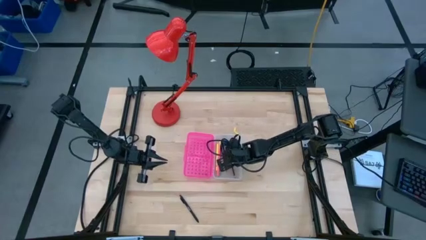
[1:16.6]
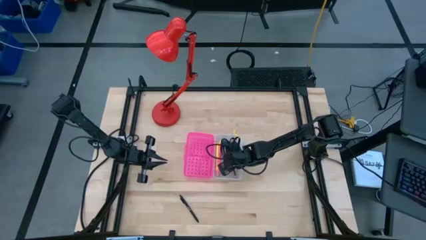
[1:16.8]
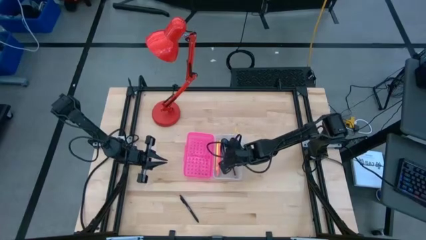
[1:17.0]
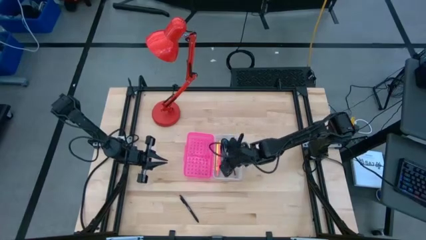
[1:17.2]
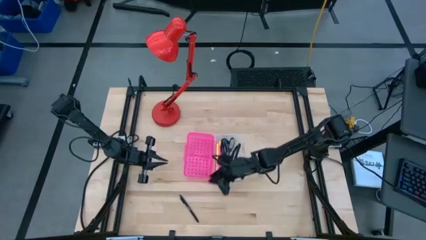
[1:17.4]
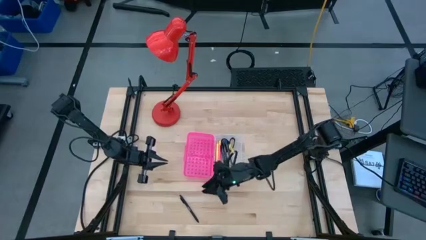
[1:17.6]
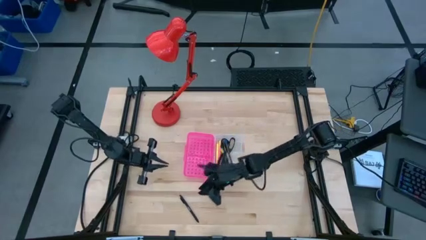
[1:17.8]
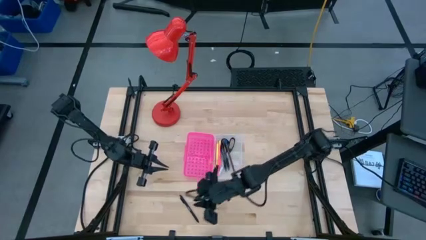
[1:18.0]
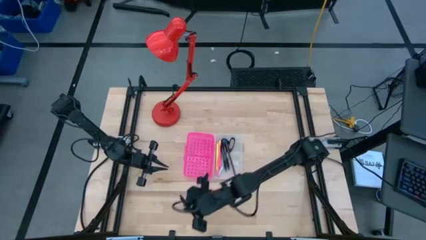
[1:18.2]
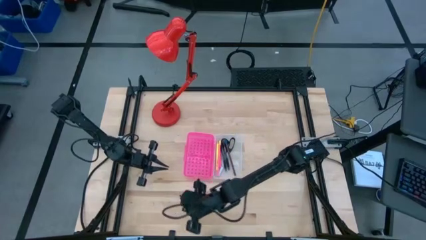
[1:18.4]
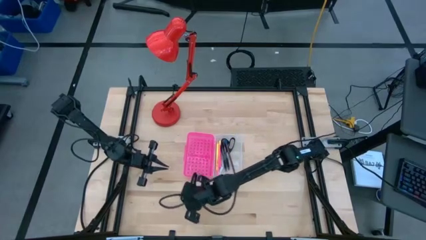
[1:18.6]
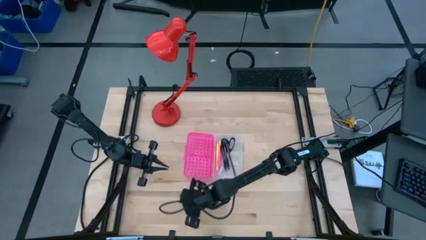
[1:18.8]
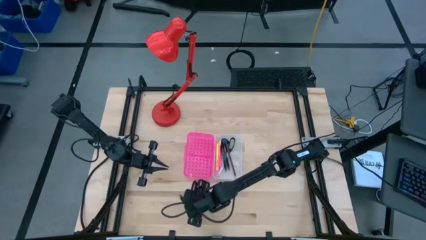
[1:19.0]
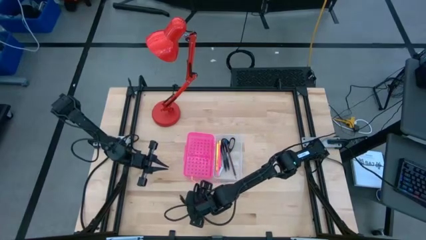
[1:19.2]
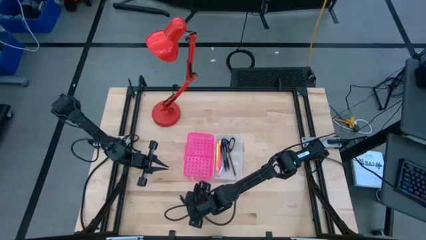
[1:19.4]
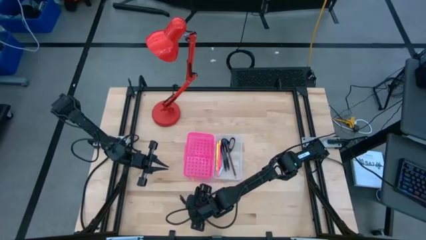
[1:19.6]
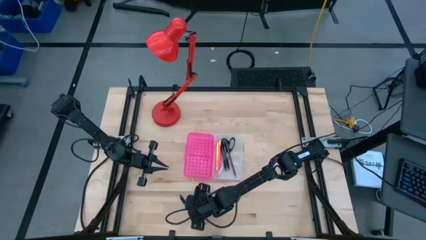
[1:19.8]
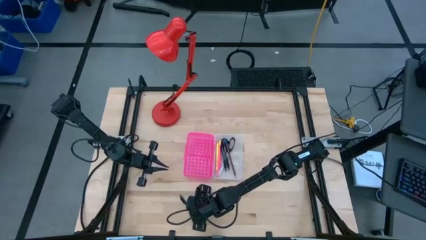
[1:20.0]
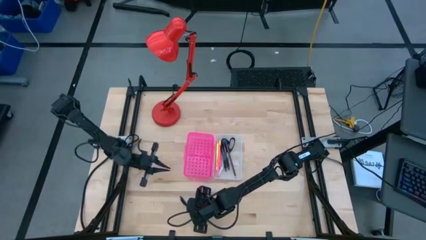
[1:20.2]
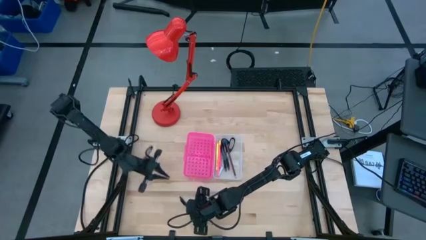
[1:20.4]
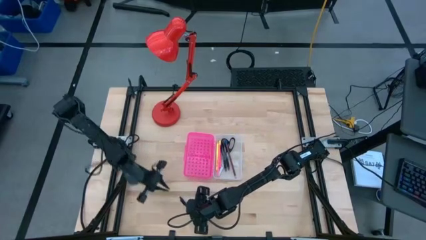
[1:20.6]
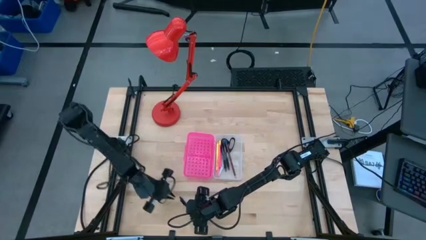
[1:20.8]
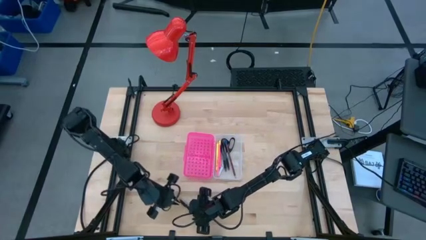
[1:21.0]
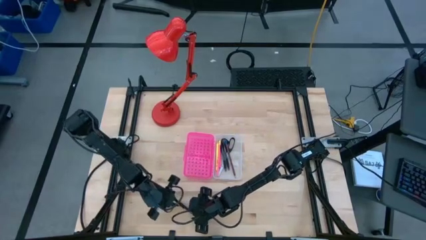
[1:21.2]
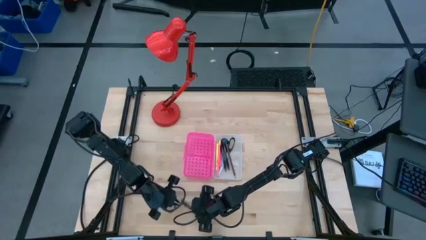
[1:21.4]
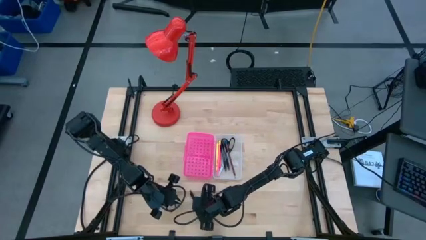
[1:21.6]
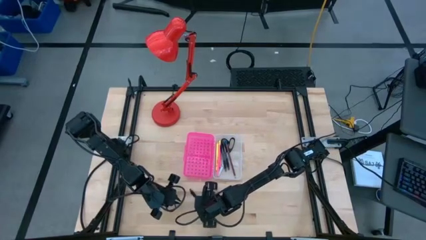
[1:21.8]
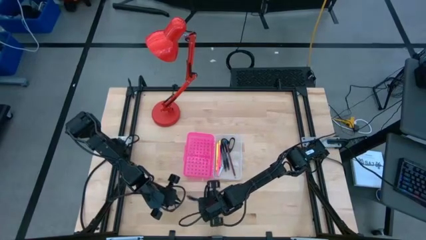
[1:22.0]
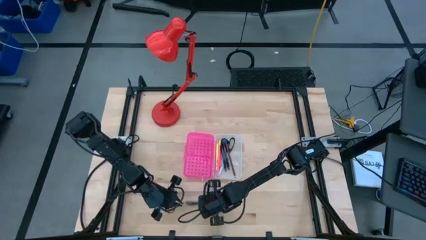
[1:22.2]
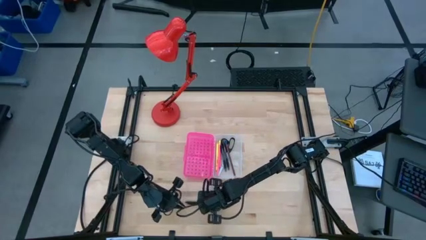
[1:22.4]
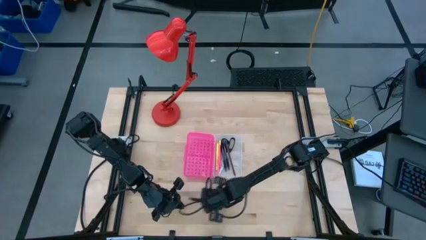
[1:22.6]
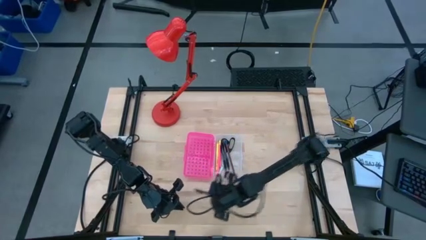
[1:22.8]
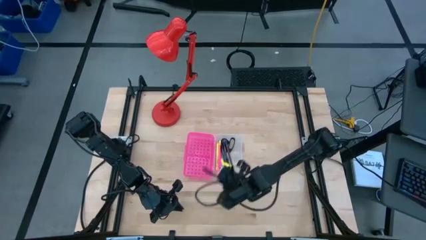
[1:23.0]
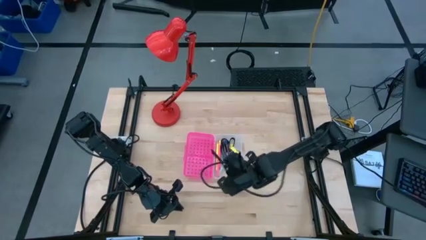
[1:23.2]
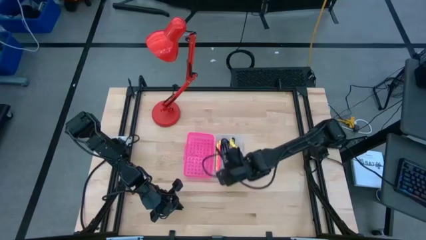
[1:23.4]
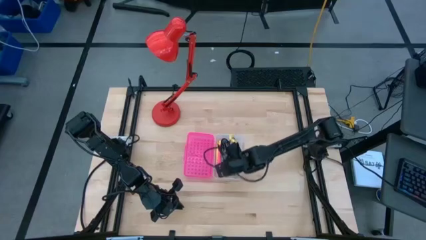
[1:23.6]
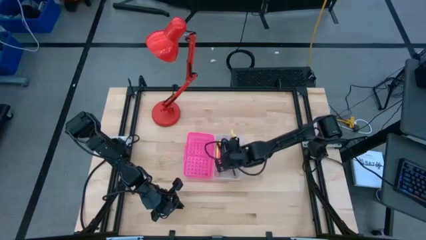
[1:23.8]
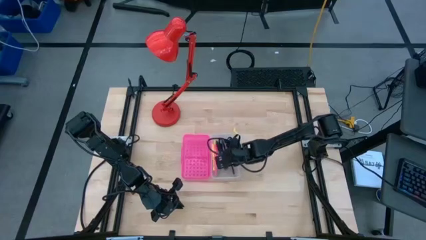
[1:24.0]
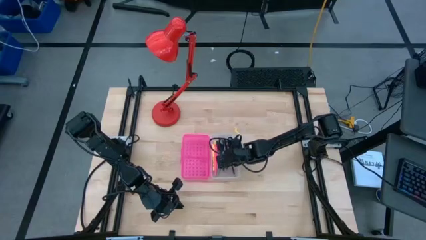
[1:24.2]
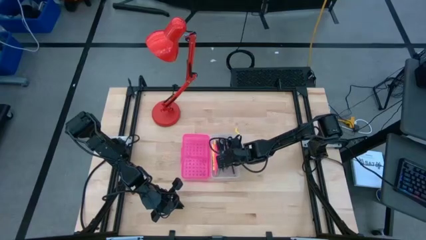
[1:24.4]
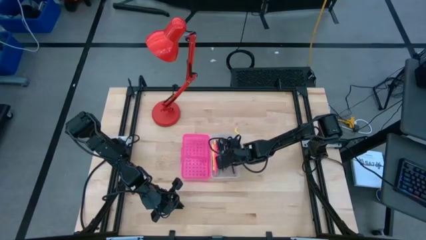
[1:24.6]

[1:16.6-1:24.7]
Task: Pick & place school supplies into a supply box
Put the black pen into the pink supply box

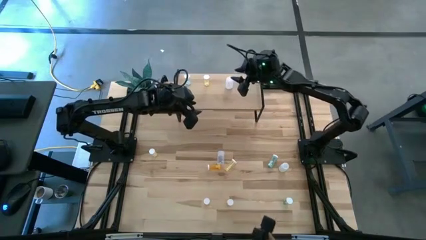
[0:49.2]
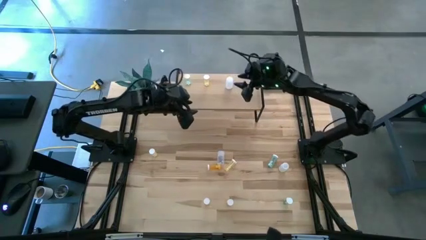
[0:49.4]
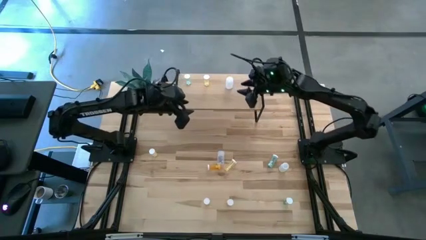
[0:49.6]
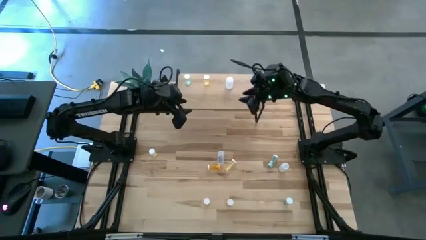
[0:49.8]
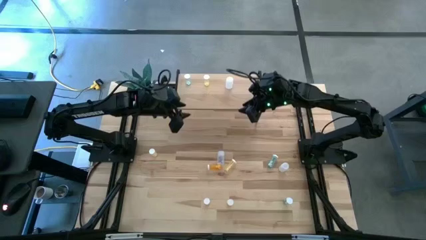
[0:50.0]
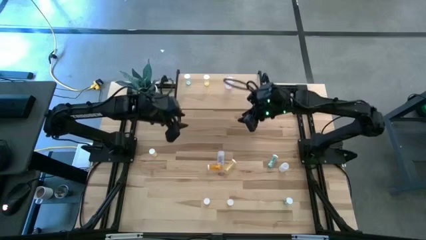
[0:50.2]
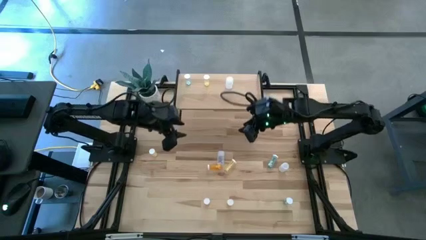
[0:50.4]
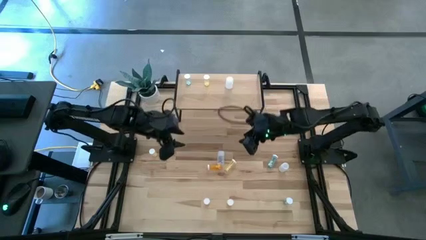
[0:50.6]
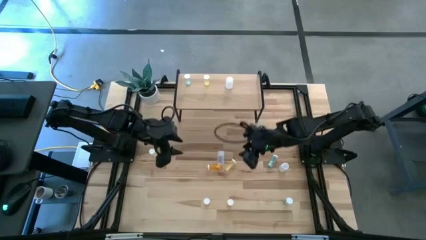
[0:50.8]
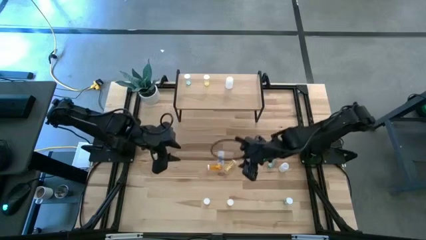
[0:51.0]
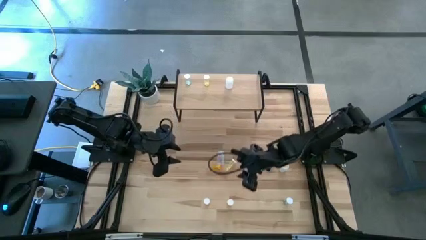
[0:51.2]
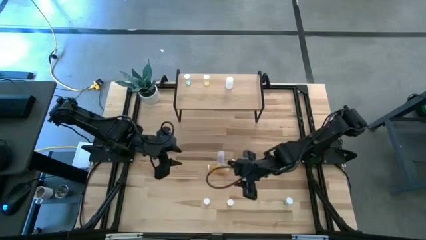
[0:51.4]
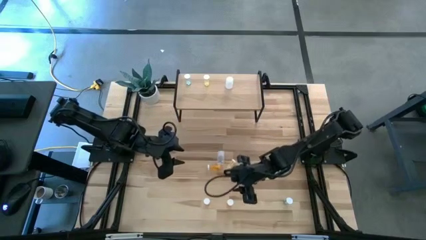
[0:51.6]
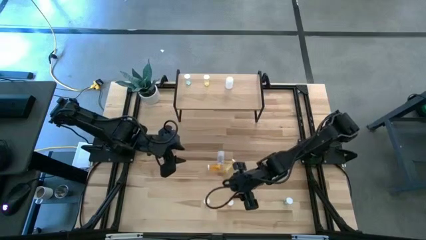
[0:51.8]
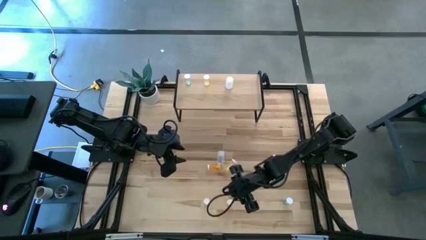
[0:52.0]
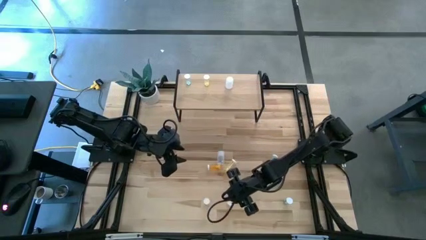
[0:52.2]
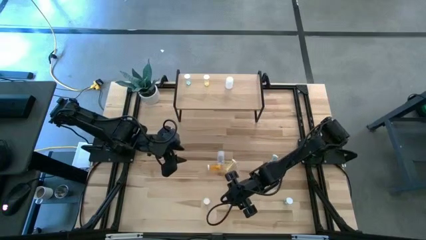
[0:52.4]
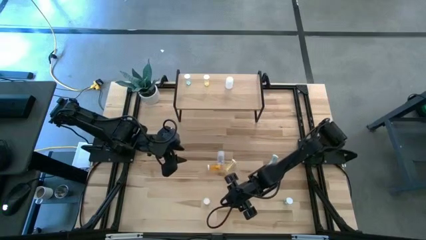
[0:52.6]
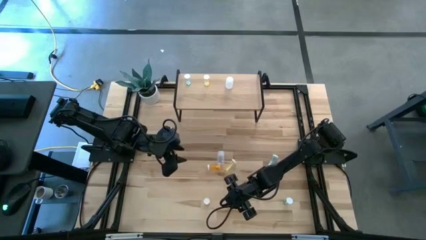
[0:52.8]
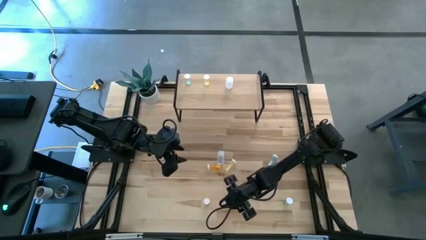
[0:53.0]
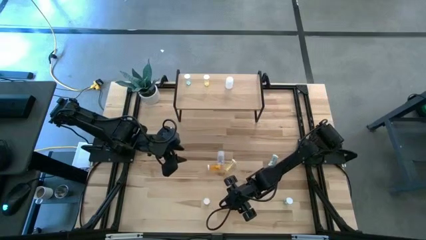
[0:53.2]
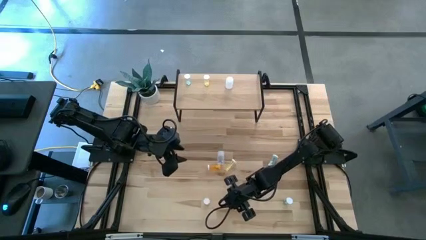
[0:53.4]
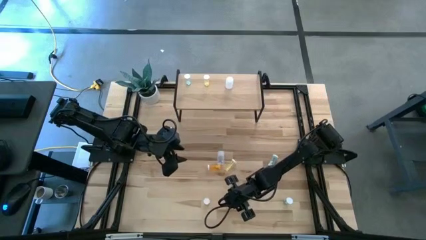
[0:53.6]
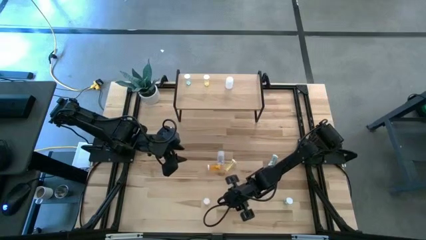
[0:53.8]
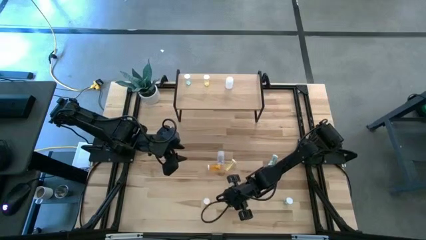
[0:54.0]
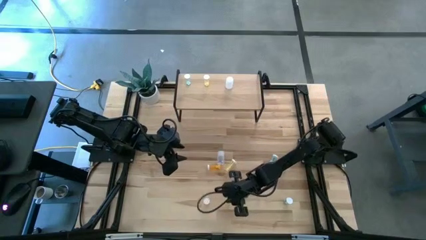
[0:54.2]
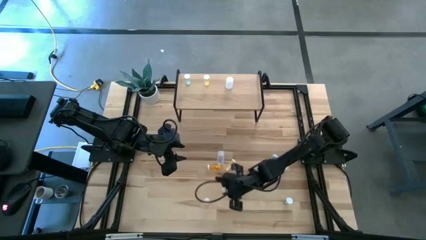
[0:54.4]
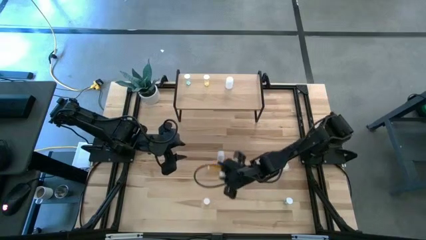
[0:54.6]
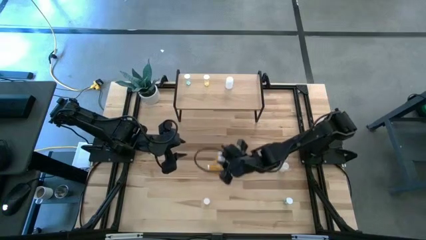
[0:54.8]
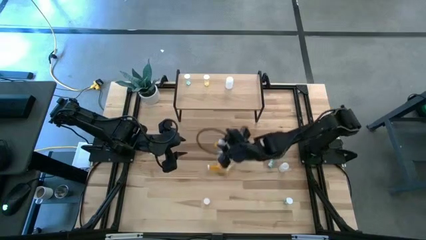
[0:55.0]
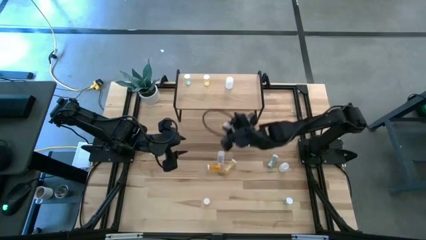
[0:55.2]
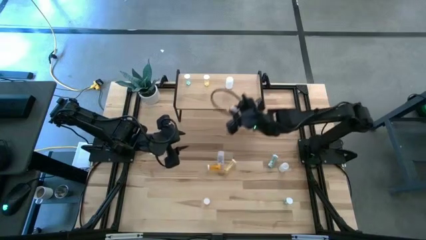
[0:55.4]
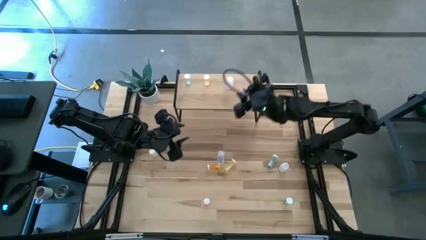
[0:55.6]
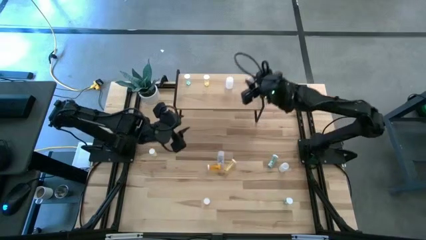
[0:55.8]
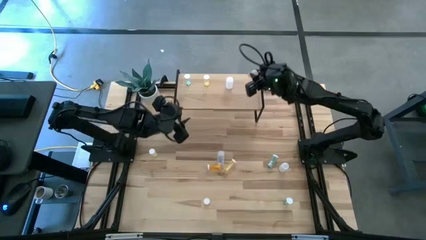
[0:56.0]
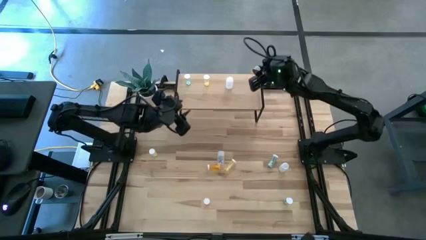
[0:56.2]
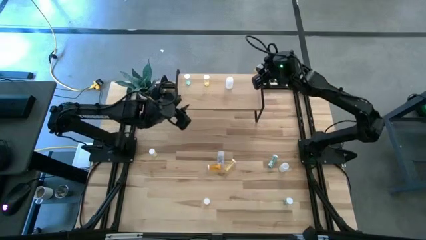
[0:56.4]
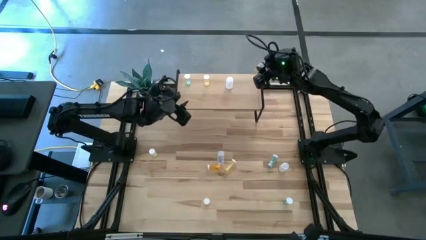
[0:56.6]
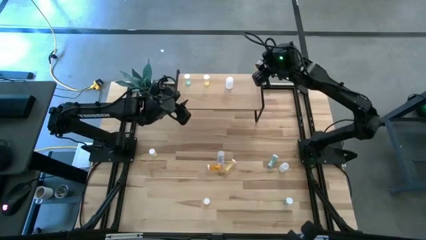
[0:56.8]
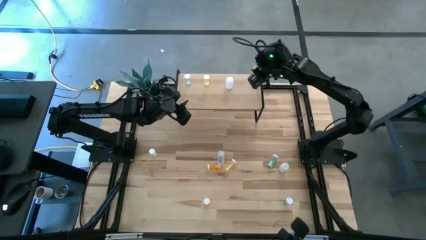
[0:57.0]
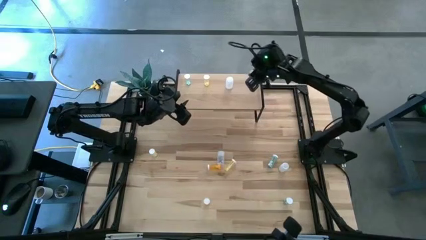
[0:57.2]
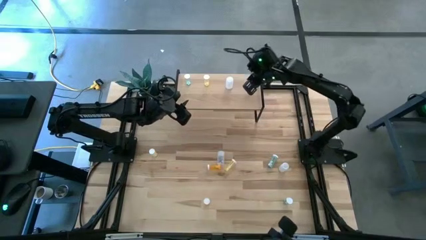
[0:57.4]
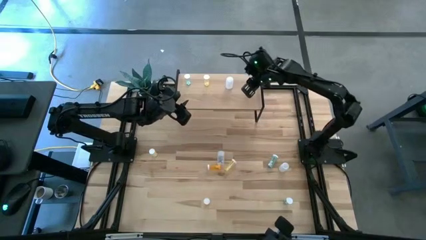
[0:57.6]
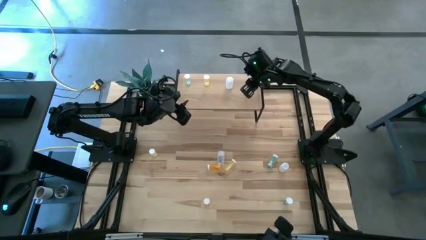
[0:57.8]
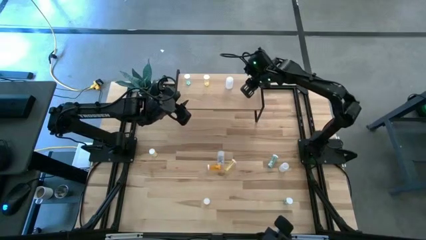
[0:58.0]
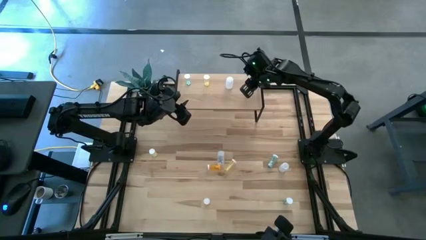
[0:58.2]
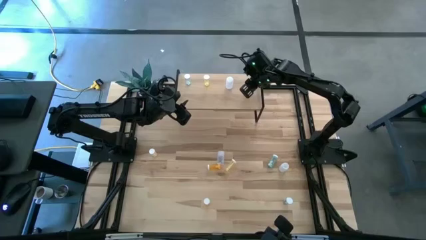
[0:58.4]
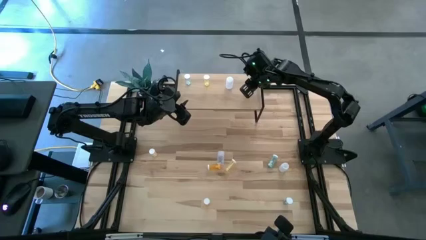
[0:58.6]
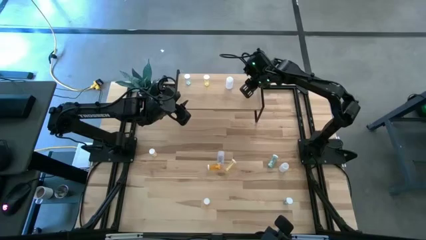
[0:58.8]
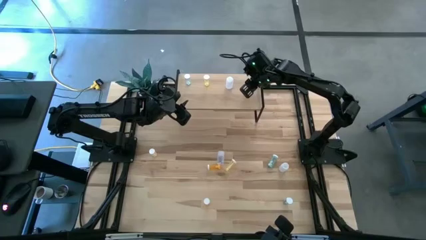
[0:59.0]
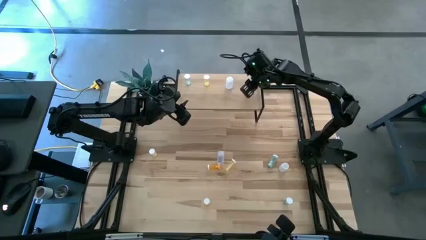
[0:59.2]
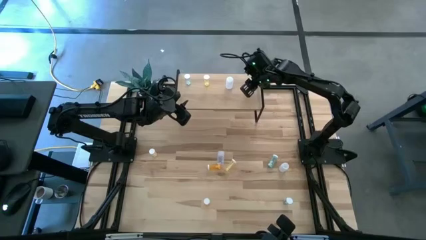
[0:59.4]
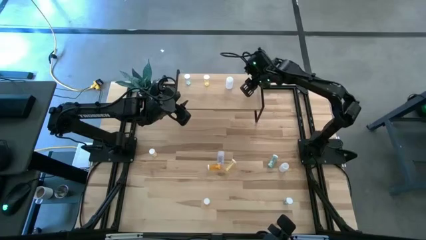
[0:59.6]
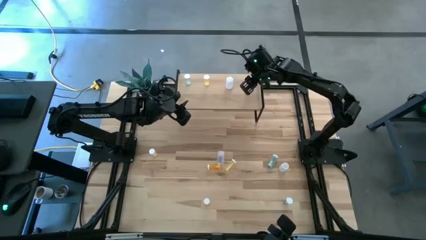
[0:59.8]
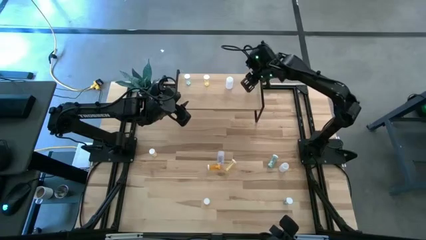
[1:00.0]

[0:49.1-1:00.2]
Task: Pick and place medicine bottles onto shelf by color
Put the bottom right orange pill bottle on the shelf
